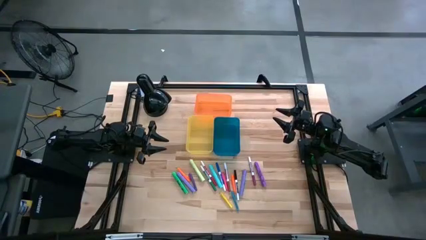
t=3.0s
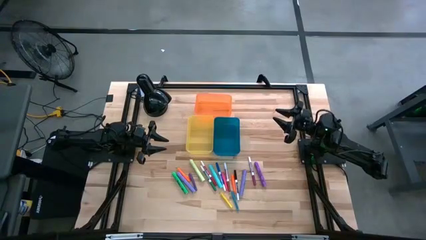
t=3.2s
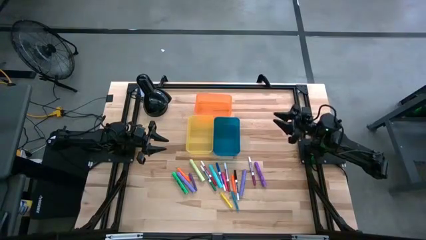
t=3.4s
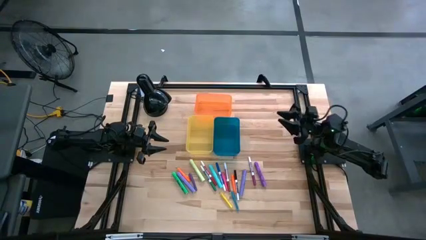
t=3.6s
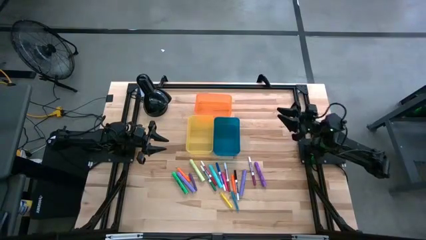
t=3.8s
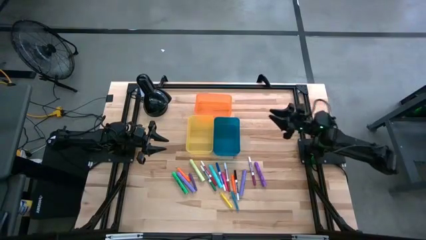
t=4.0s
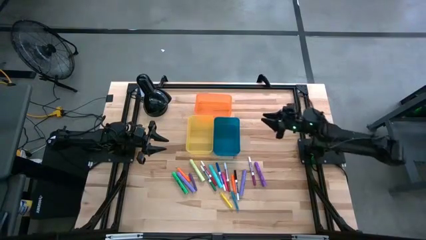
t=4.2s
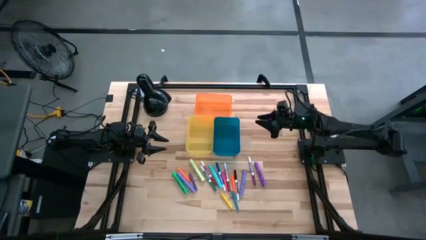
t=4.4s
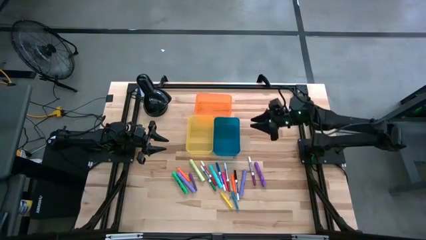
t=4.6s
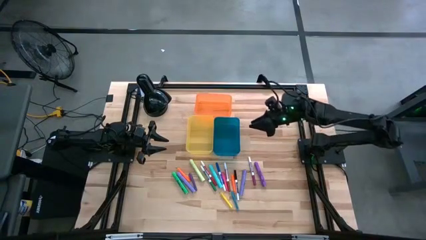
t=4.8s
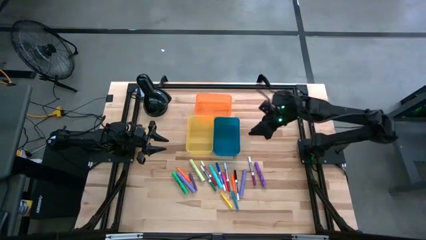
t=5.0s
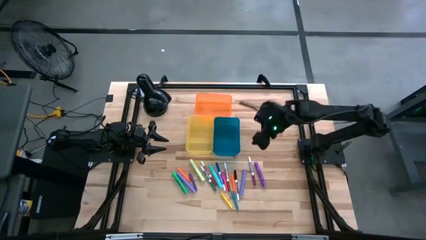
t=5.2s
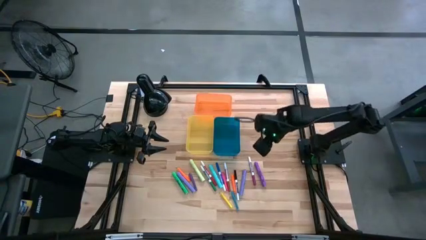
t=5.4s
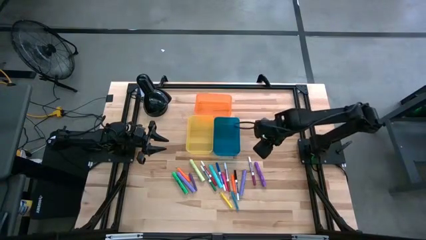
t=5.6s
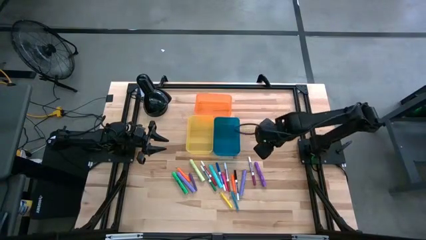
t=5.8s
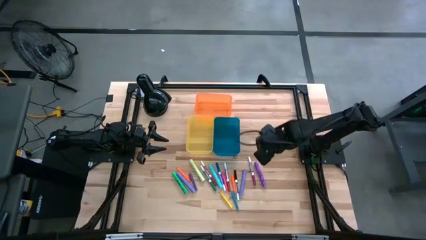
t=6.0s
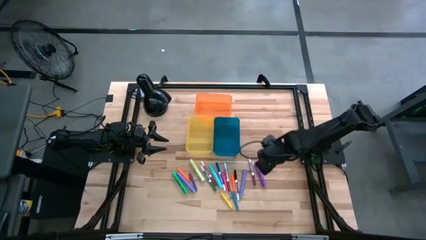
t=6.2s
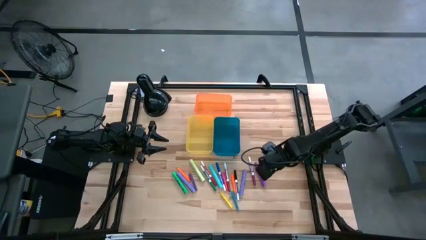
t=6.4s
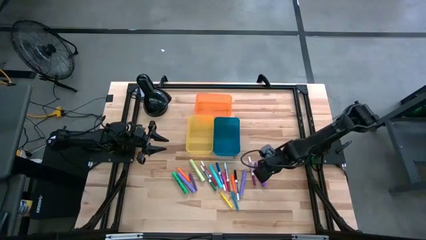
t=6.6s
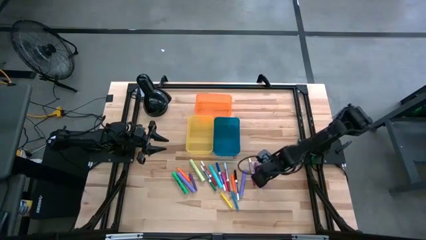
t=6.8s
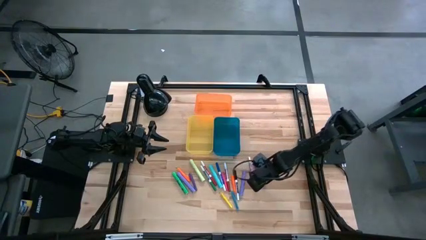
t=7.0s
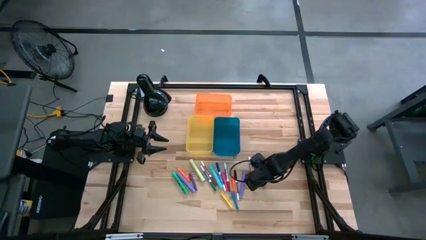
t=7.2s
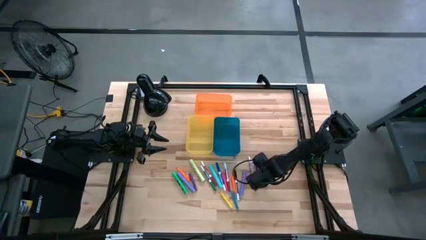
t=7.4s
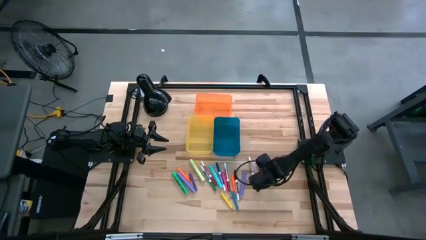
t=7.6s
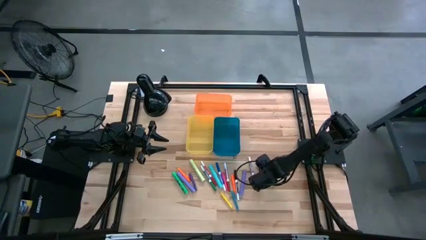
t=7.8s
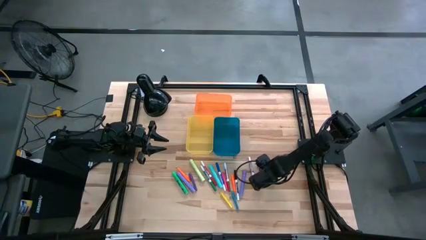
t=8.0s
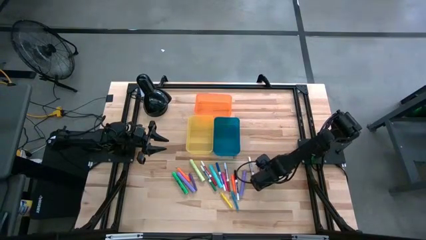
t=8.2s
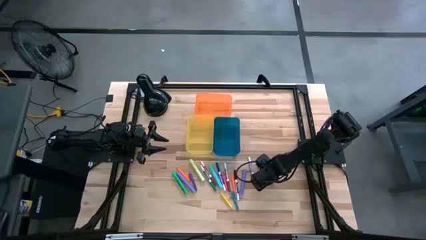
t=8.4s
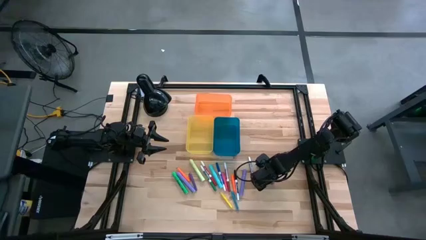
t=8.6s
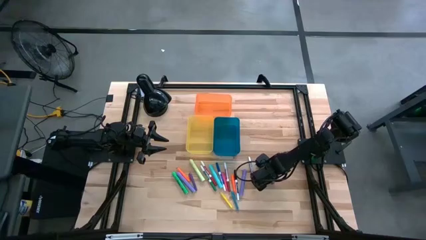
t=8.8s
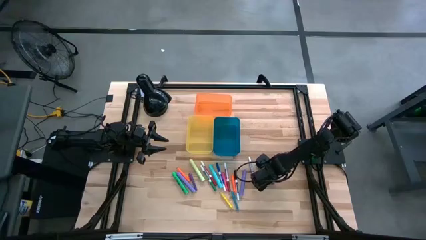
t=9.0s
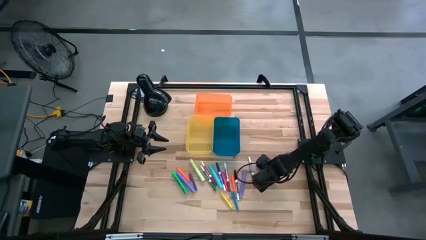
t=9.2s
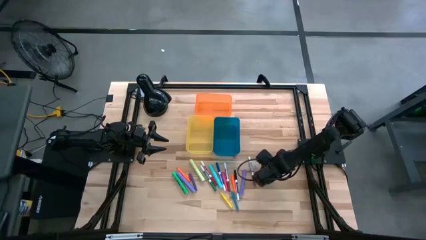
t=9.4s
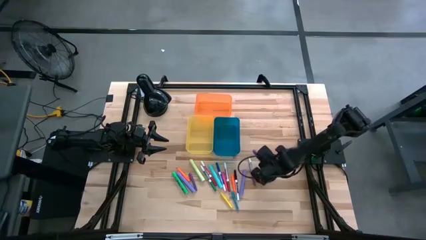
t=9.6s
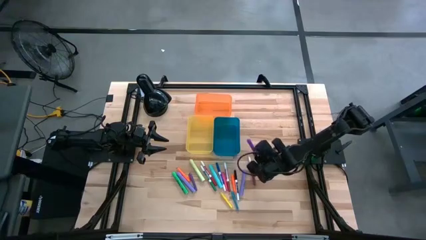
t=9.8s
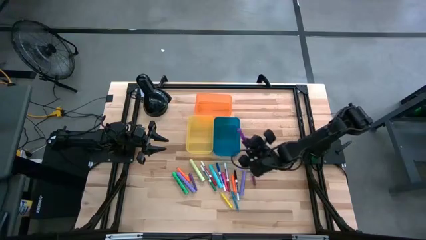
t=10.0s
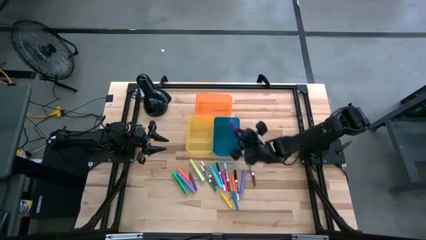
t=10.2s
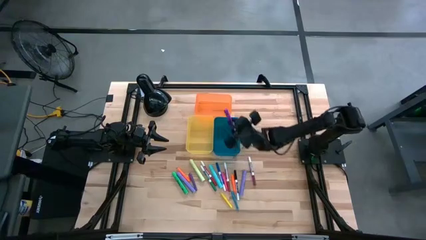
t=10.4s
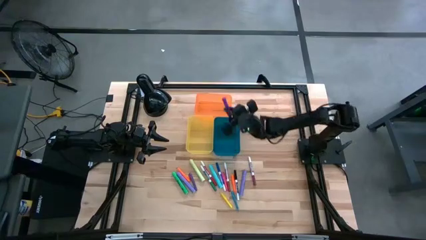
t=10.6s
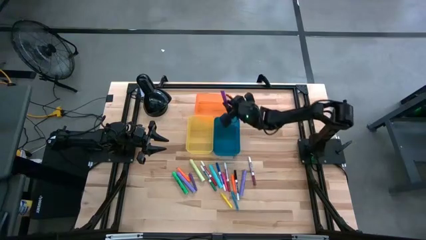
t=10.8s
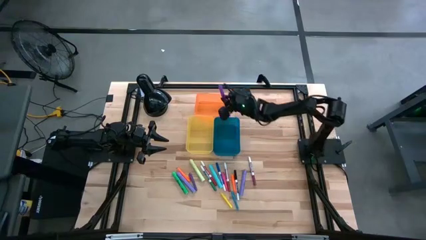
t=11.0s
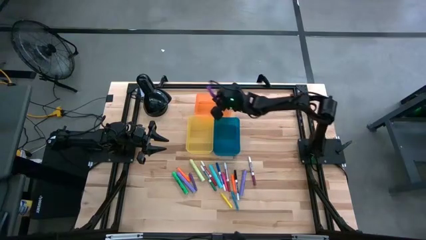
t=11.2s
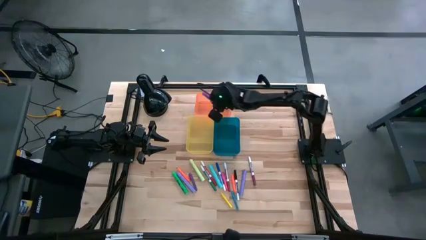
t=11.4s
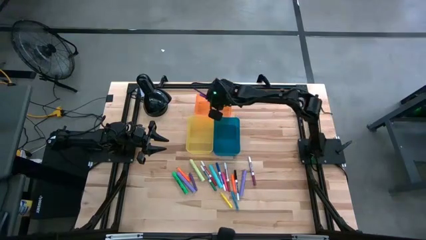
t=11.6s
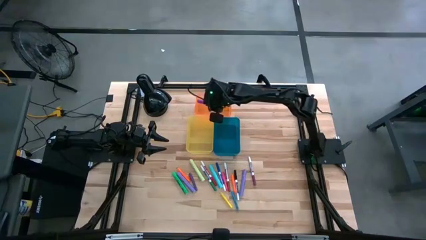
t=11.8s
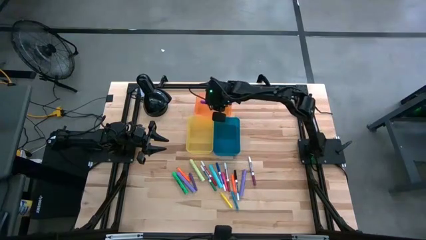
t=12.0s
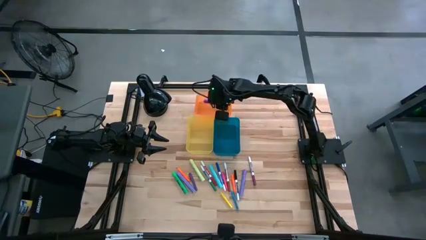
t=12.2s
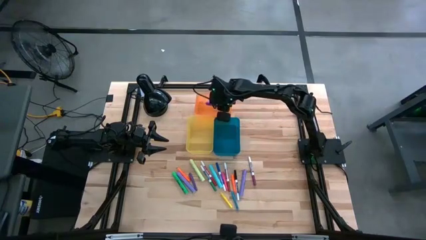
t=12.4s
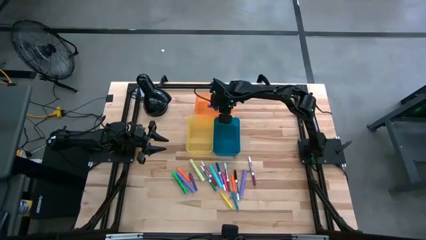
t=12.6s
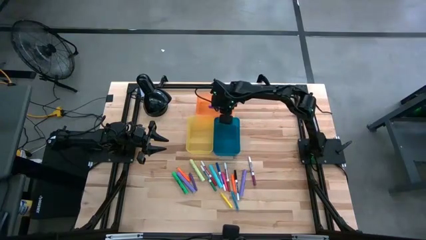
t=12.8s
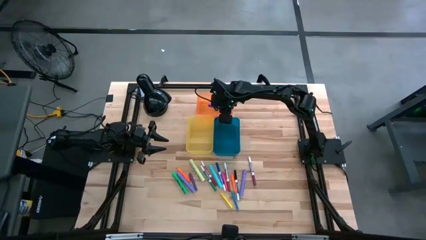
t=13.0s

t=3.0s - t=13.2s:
Task: Pick & Place Markers
Put the right purple highlighter pen into the orange bin

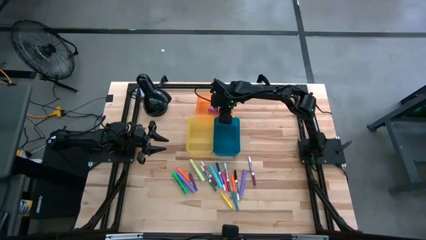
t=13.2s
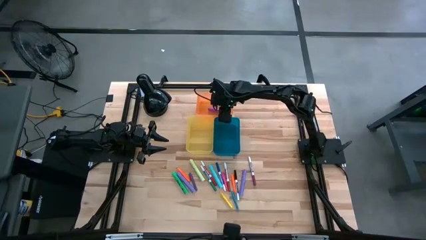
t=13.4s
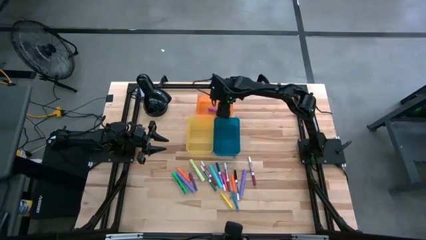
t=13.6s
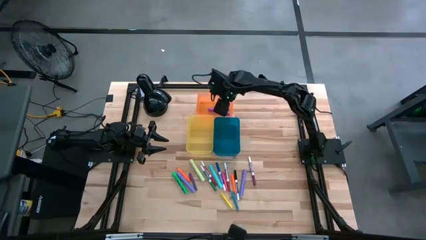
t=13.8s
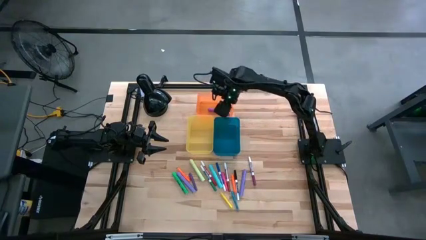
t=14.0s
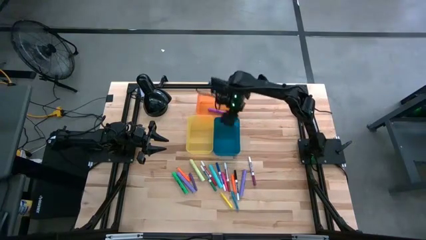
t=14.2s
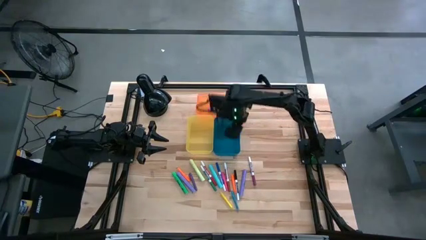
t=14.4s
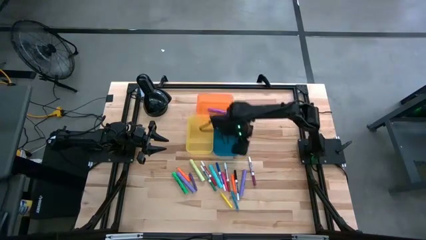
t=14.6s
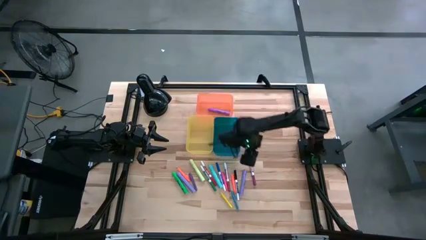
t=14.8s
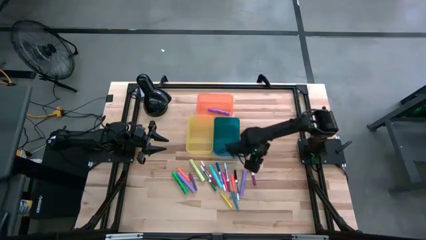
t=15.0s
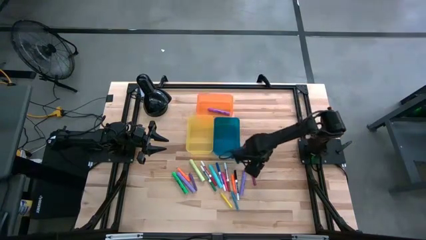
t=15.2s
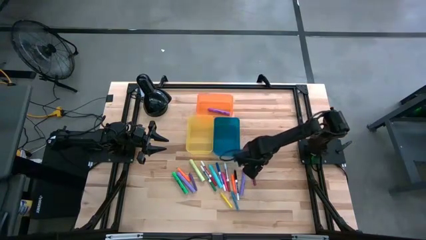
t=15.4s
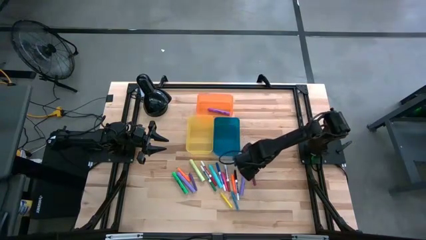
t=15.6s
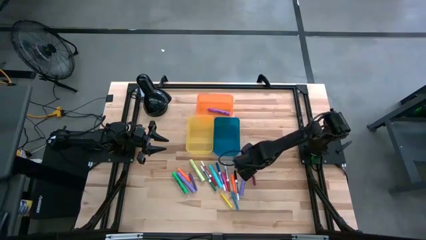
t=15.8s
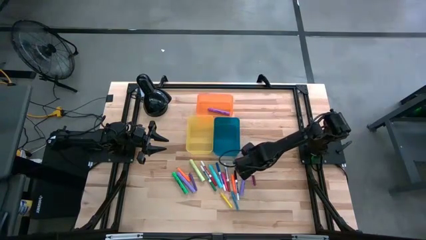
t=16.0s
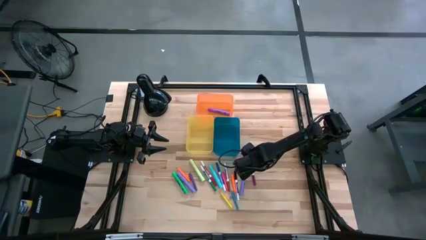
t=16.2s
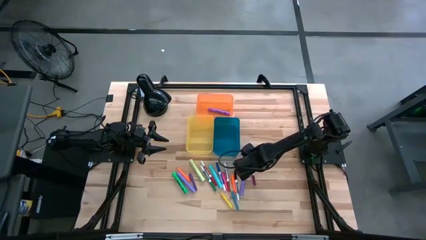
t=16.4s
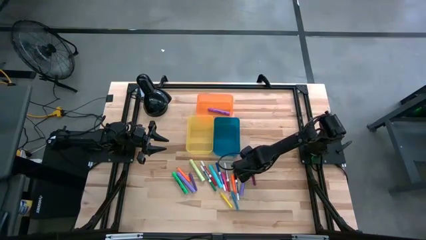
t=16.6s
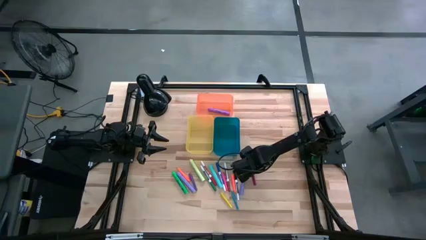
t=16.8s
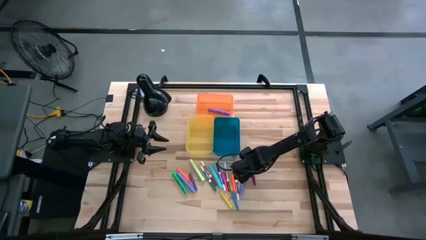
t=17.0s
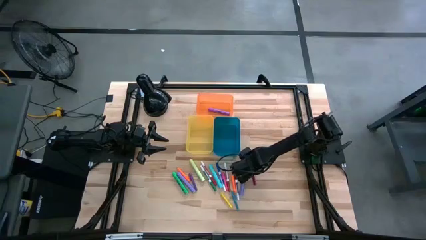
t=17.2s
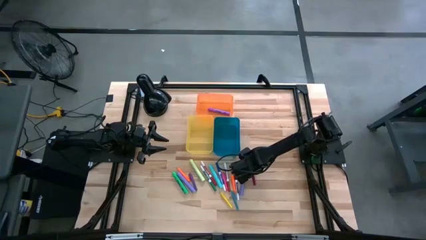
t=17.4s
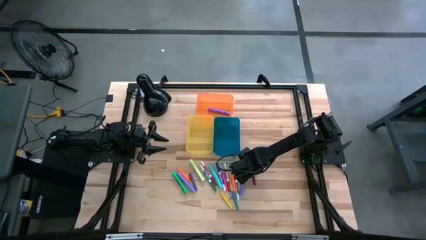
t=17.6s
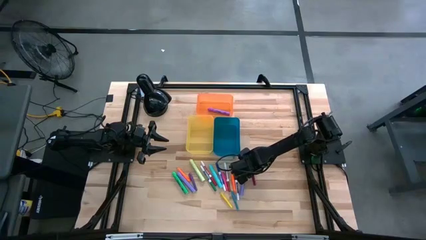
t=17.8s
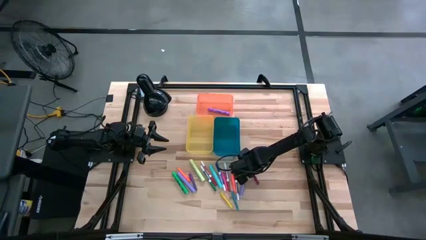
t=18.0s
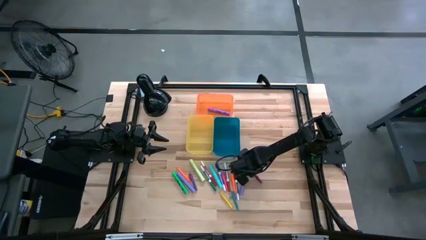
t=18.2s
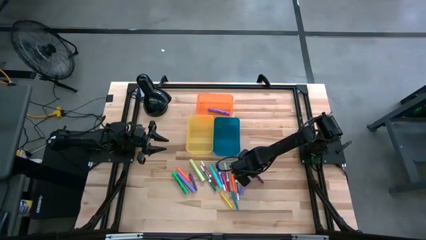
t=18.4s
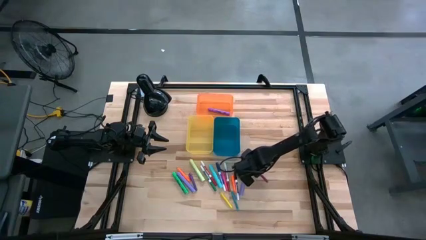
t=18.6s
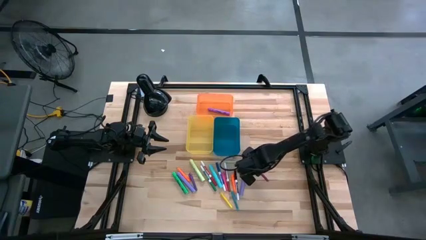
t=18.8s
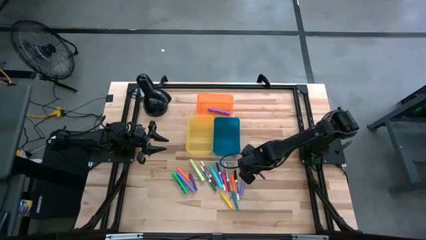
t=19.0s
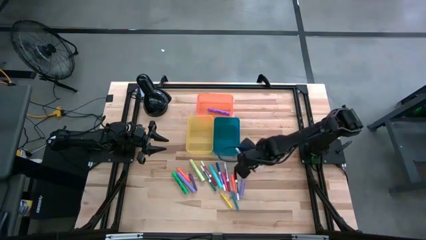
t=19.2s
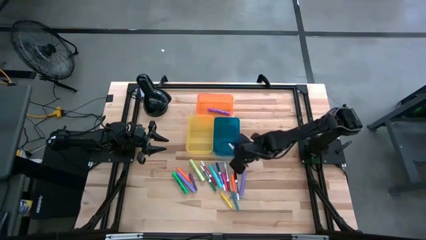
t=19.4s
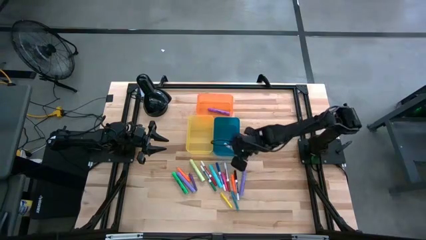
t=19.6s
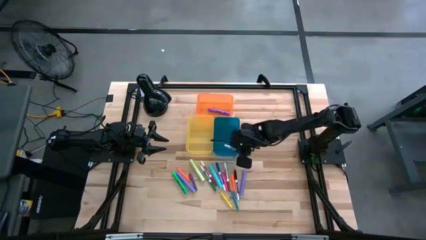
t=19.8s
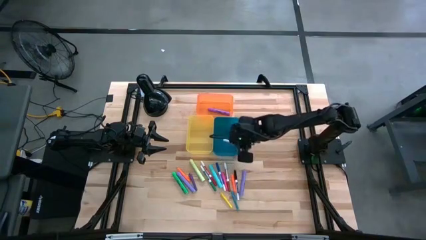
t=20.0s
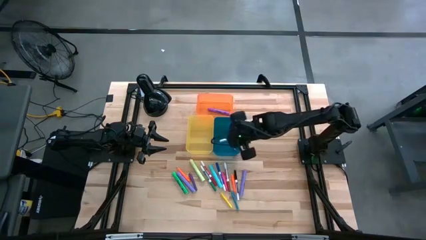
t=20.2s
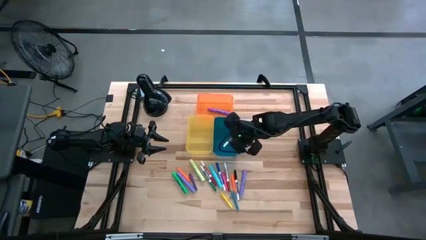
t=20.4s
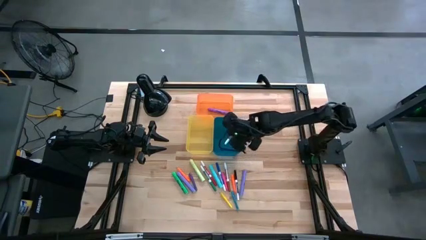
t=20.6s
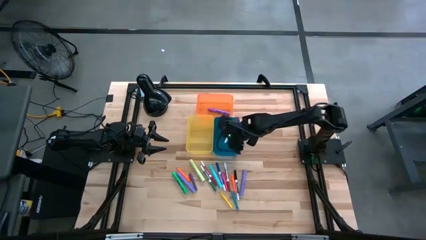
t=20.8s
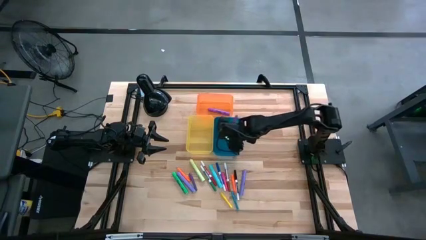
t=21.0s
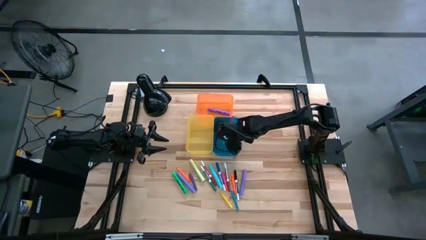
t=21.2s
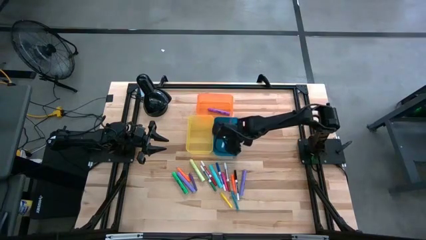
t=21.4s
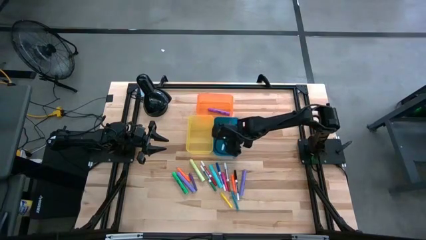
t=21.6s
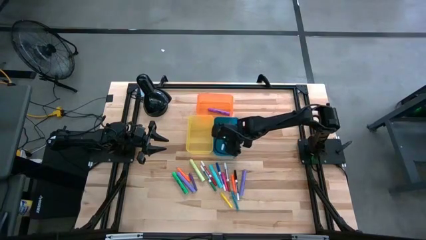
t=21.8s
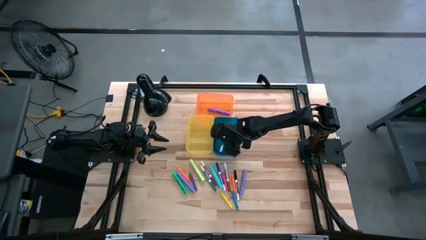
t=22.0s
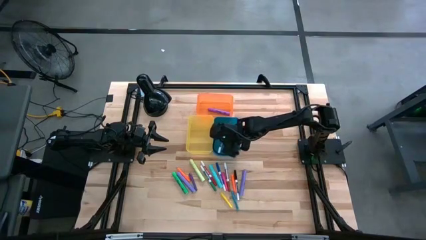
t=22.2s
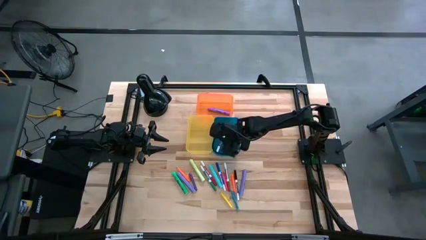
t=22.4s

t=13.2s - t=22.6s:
Put the dark red marker pen into the blue bin
